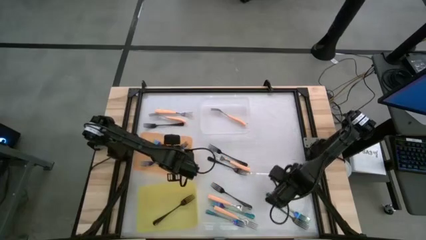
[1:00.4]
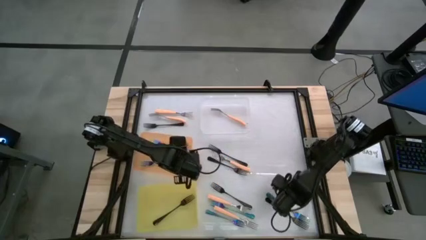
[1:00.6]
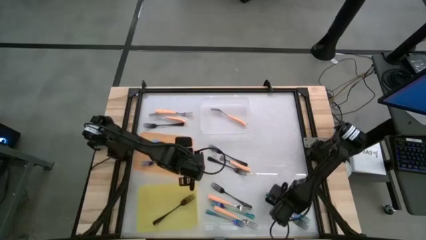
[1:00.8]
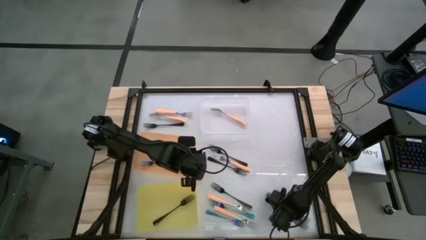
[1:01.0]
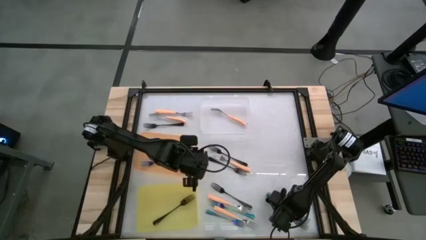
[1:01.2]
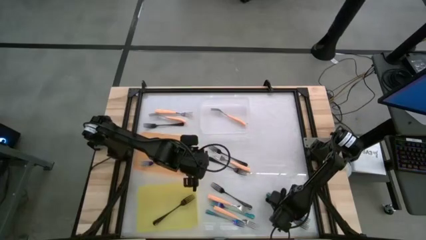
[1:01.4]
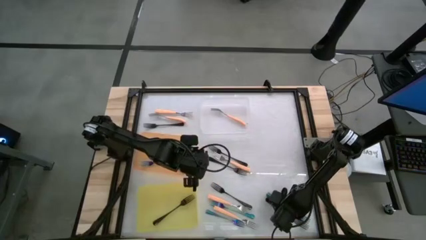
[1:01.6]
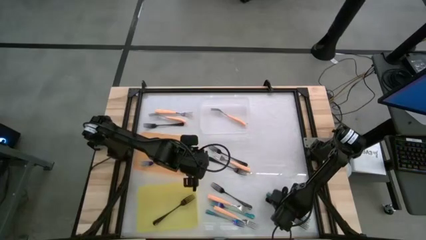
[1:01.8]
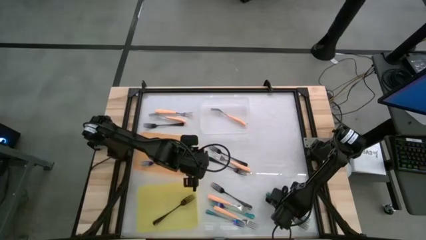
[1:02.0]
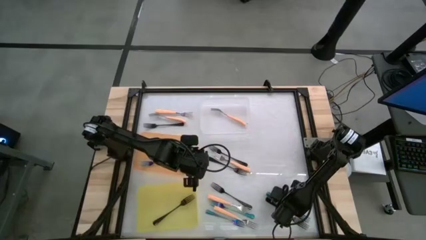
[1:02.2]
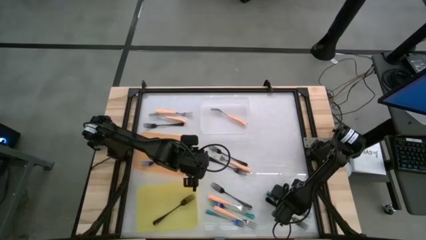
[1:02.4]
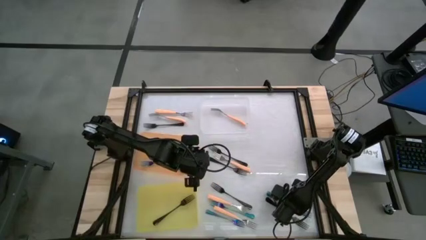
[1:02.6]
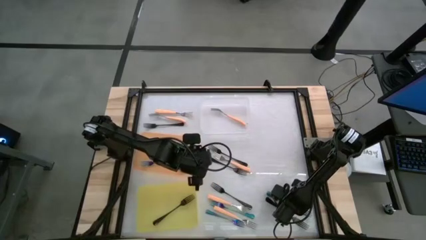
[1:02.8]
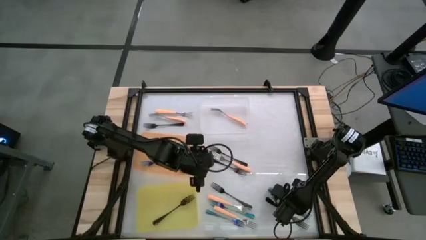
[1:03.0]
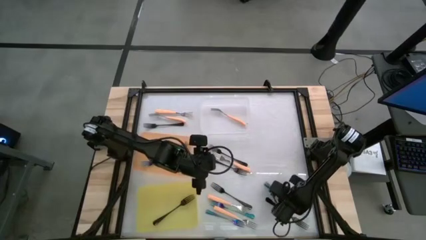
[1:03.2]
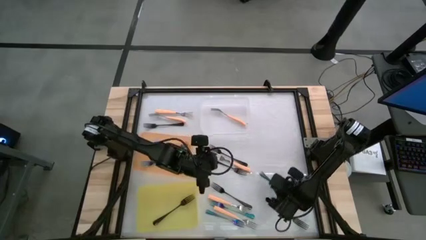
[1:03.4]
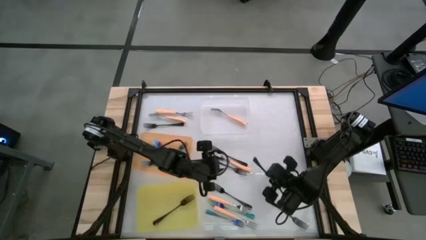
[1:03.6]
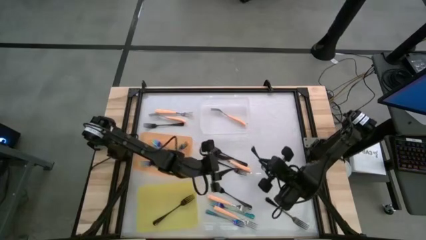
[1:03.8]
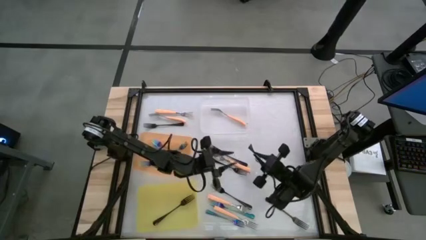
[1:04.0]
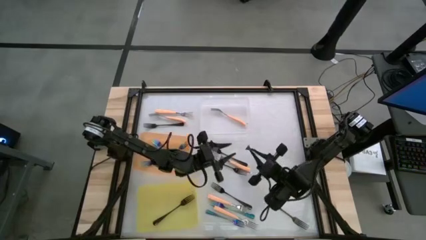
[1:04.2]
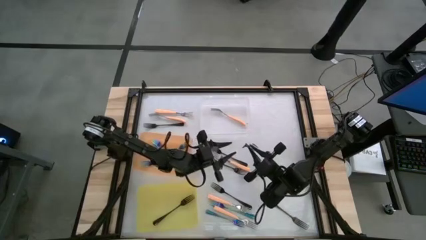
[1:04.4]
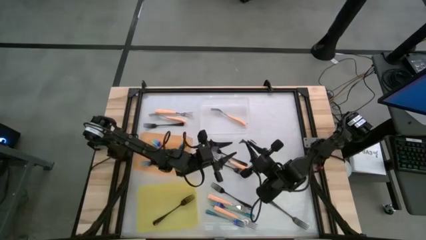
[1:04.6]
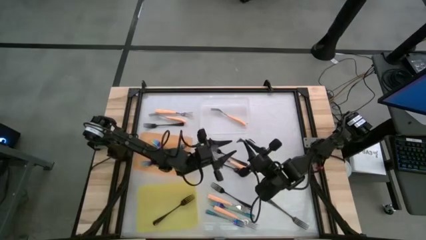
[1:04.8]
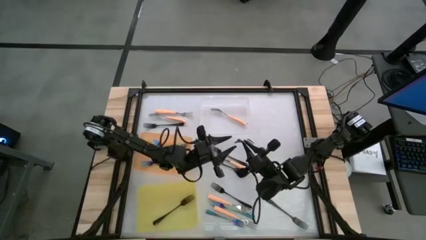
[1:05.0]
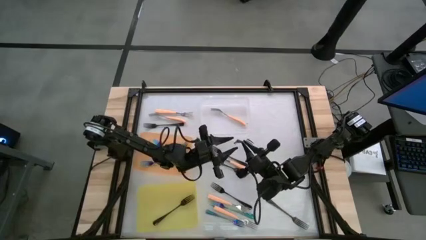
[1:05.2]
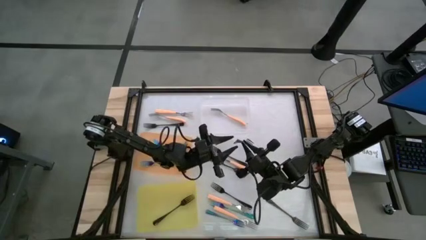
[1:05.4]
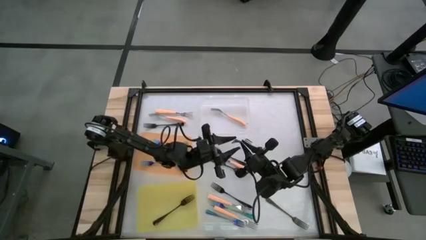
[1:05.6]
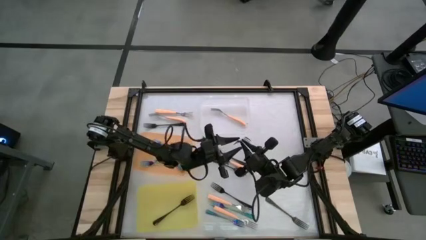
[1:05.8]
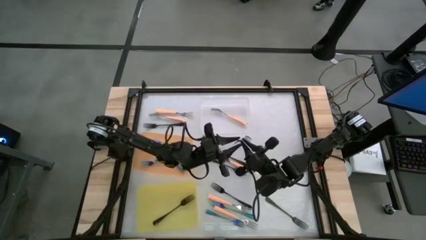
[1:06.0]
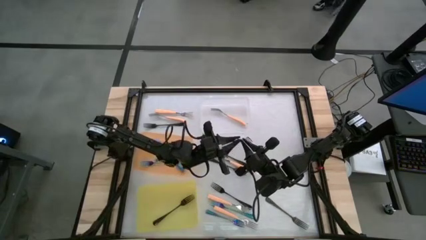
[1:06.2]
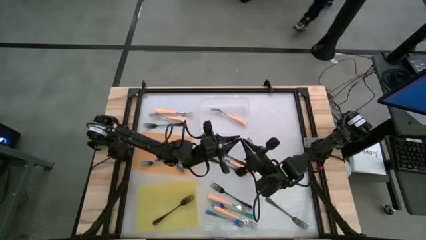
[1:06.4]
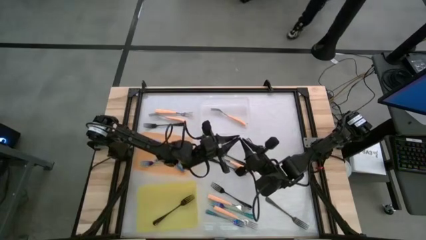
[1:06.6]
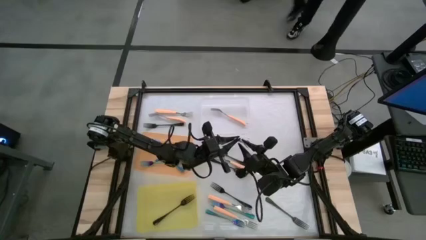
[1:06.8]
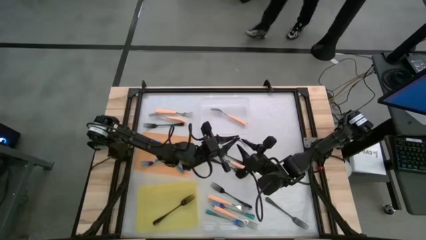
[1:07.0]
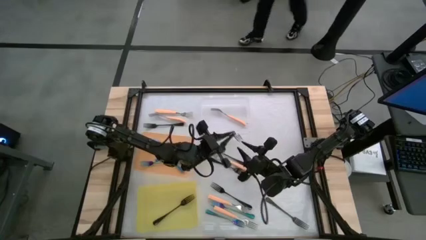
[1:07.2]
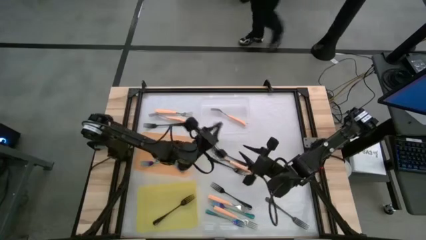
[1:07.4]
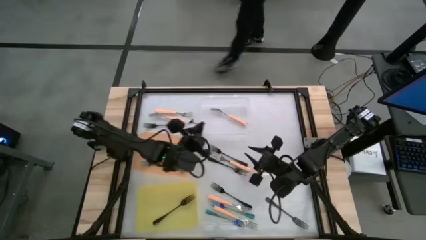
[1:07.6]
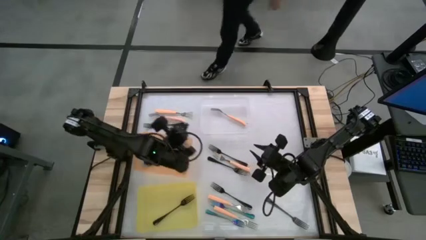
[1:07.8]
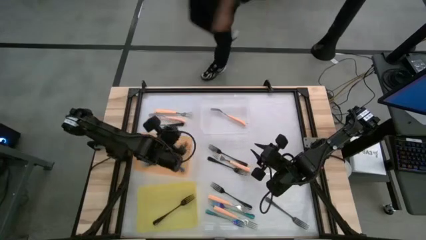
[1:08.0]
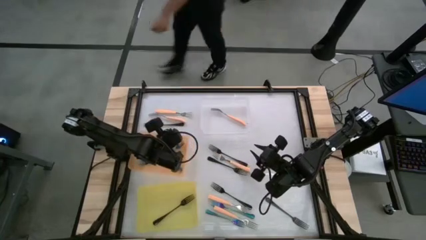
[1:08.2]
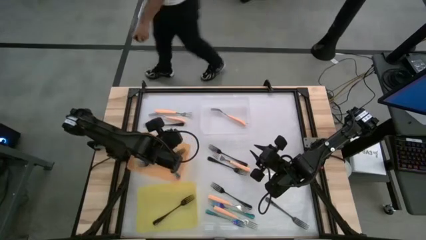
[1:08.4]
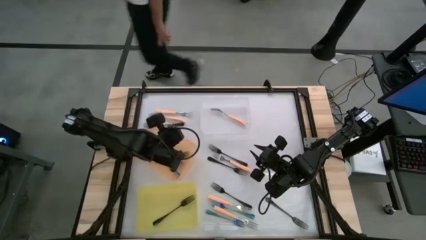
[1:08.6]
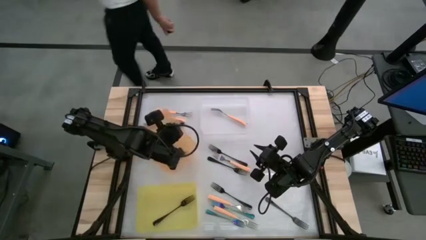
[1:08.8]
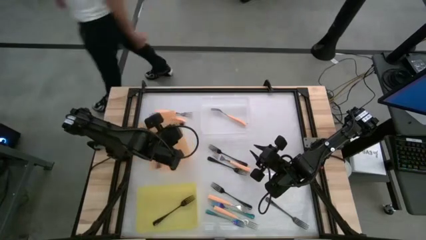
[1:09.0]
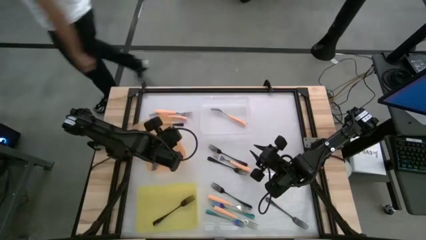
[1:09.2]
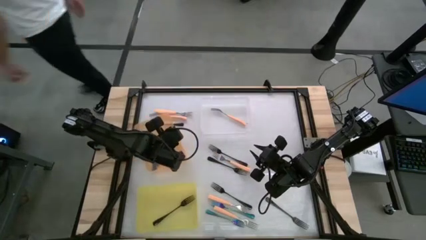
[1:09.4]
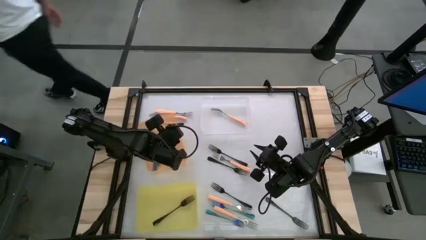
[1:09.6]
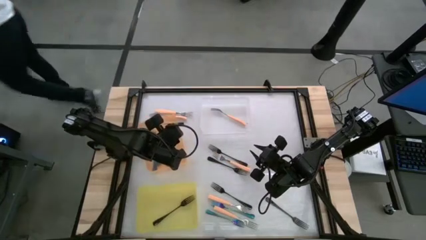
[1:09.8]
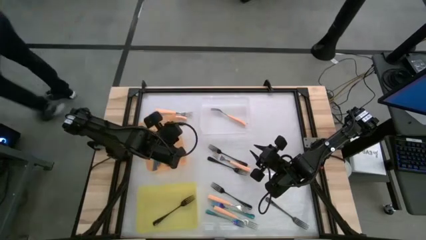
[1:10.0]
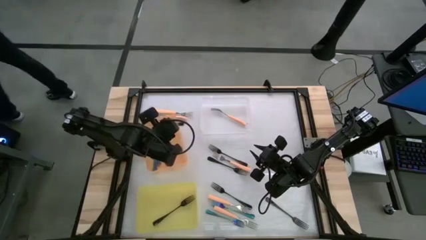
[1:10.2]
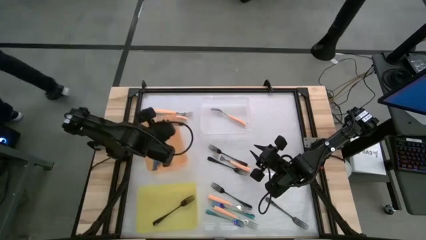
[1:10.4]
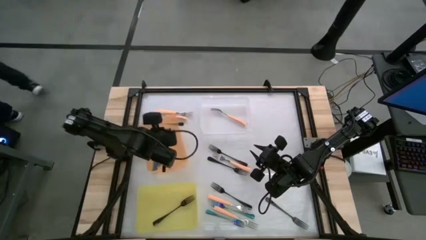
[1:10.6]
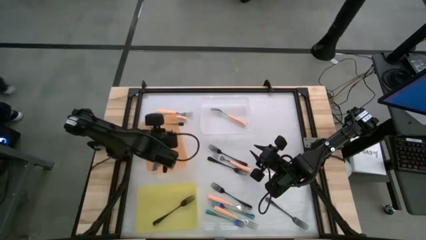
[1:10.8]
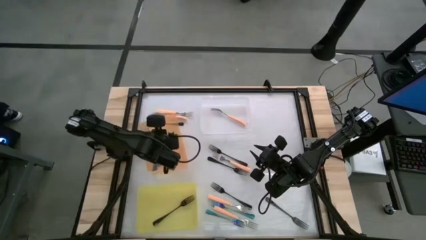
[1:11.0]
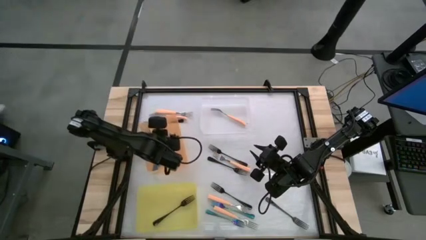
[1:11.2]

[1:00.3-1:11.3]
Task: Sort silverware by color (type)
Put the blue fork into the orange bin

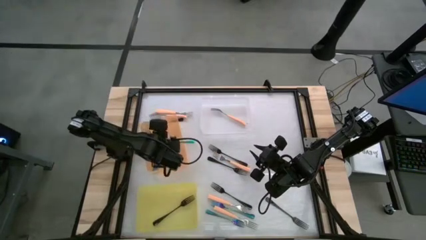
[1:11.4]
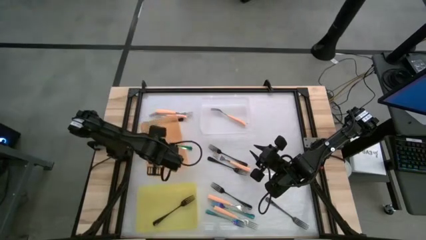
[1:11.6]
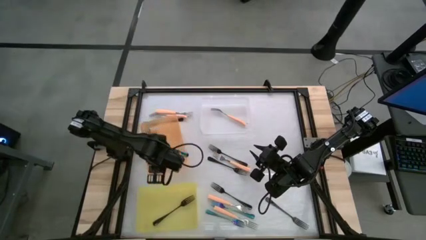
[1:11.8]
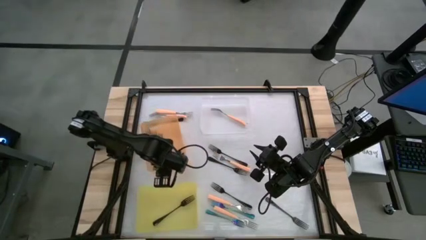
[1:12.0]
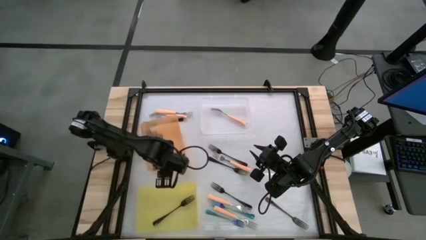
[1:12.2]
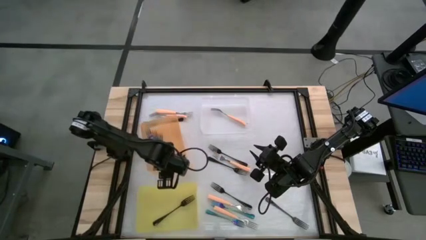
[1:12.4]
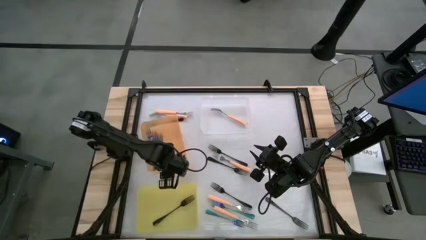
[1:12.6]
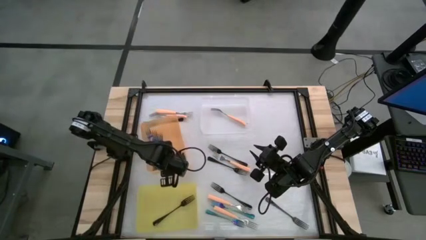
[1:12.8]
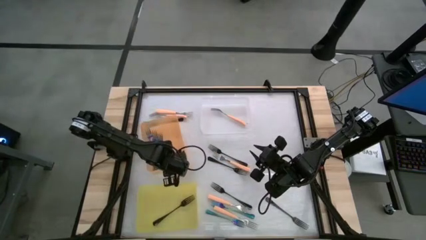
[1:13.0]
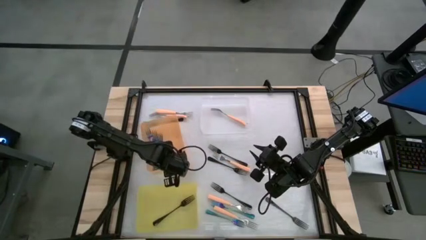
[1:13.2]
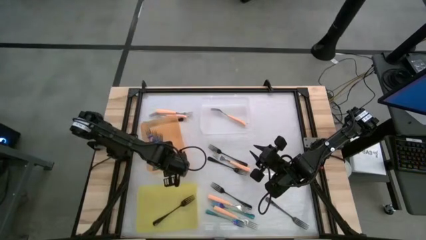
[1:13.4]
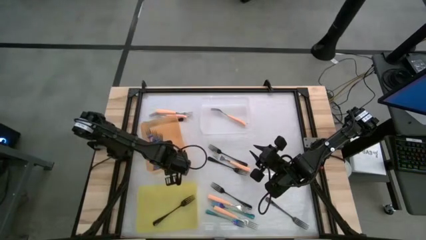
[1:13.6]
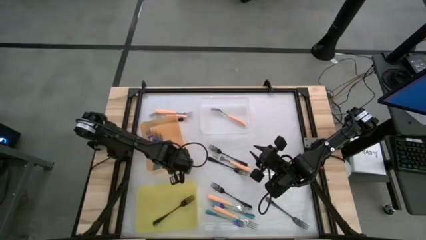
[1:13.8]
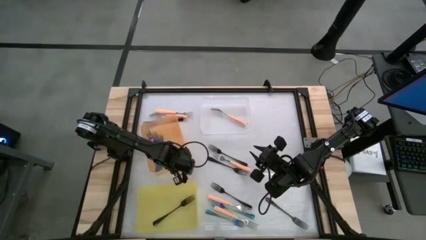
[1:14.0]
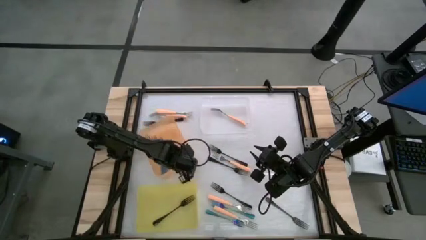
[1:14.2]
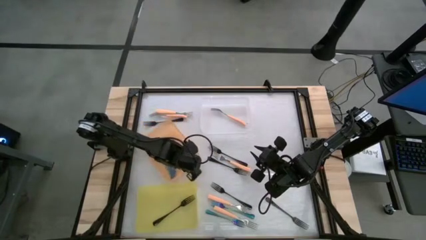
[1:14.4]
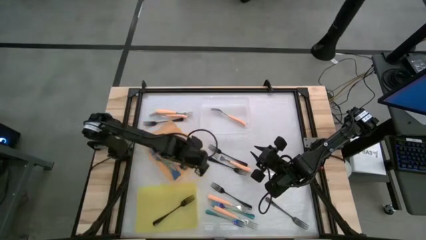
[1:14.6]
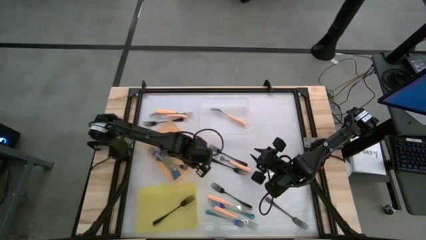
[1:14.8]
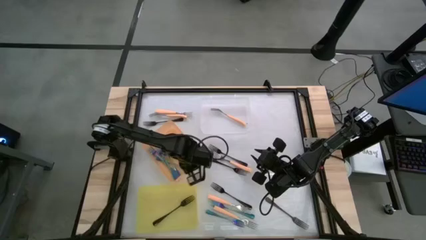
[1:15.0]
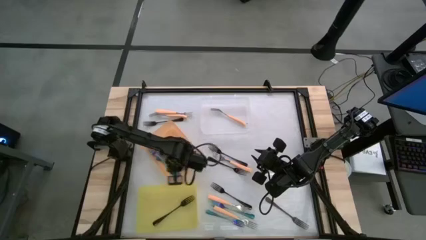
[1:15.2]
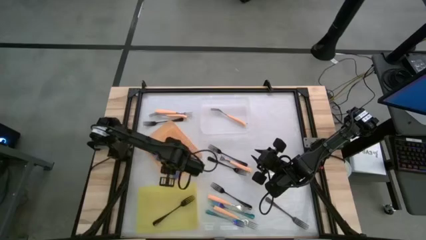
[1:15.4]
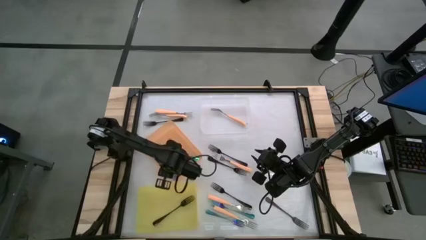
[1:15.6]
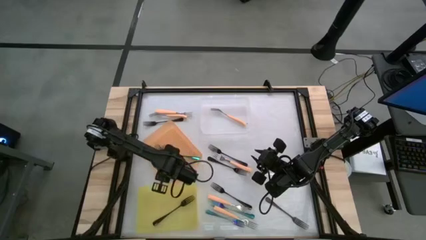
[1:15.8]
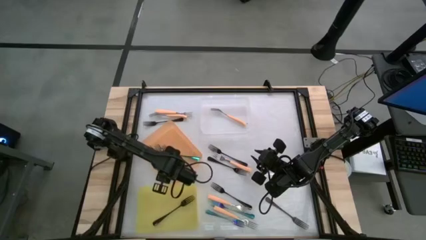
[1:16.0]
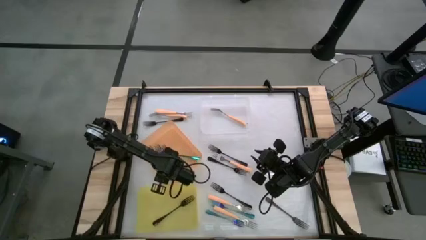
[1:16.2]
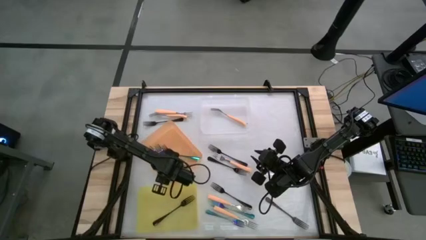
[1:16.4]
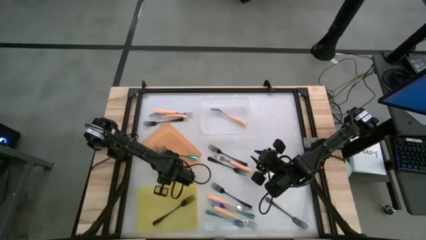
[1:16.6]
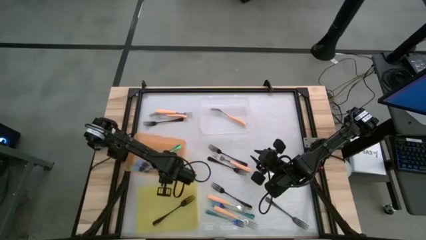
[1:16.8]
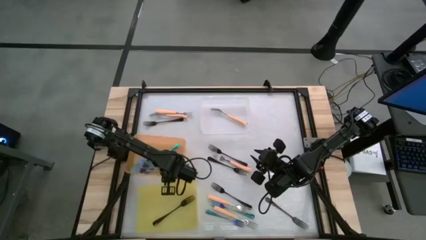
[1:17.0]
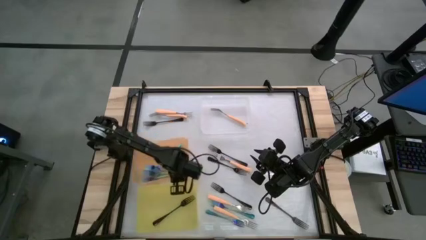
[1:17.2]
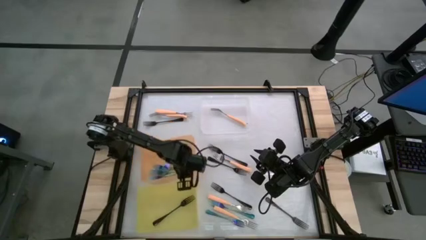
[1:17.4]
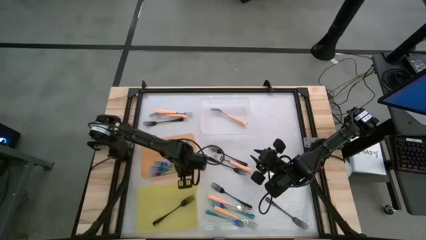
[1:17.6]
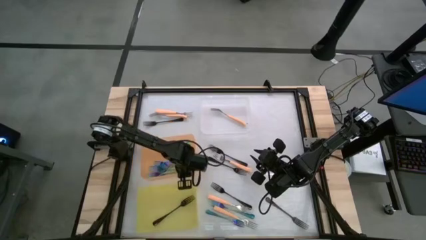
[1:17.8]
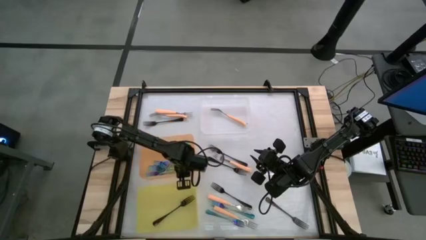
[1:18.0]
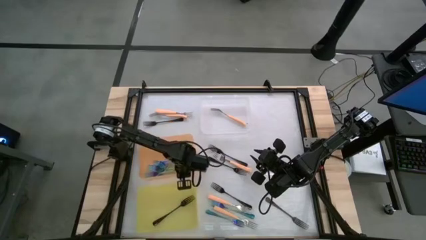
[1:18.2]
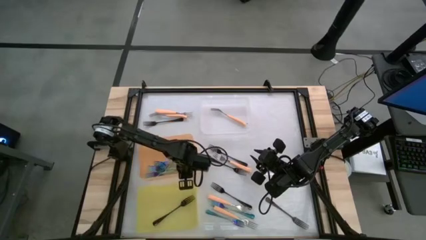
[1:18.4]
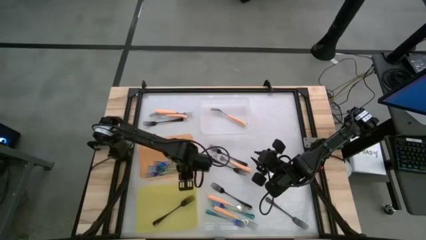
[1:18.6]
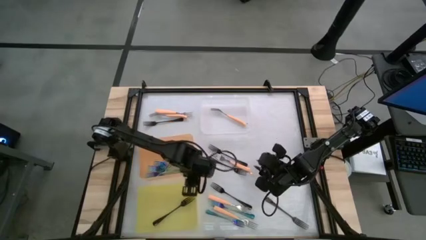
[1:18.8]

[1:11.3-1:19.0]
Adjust the orange bin to the left side of the table
